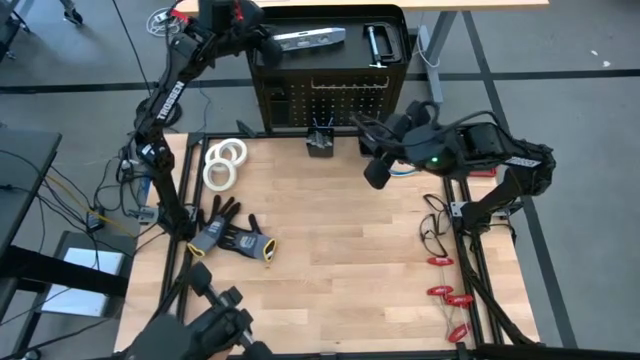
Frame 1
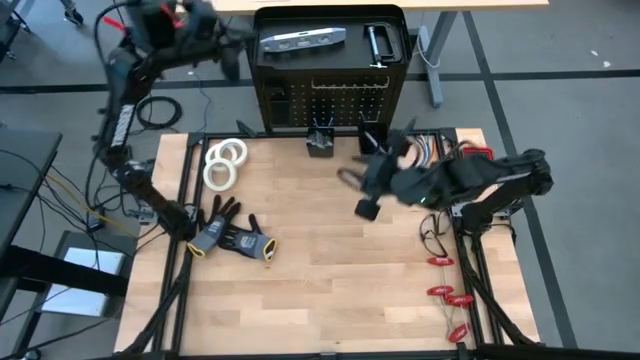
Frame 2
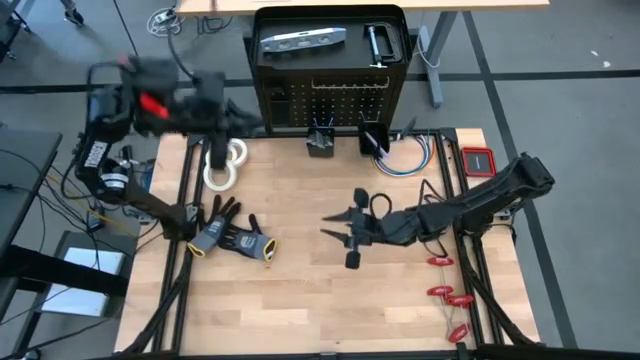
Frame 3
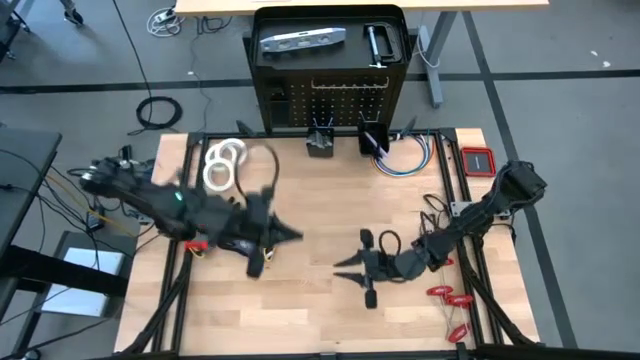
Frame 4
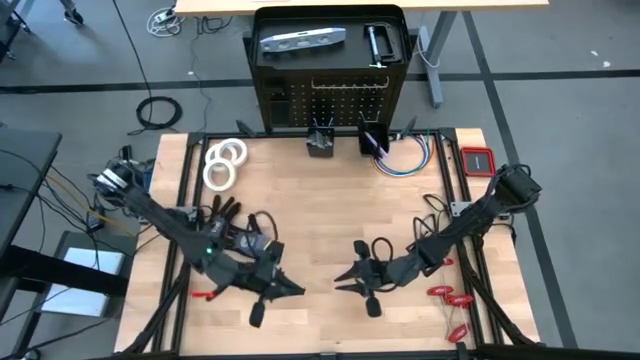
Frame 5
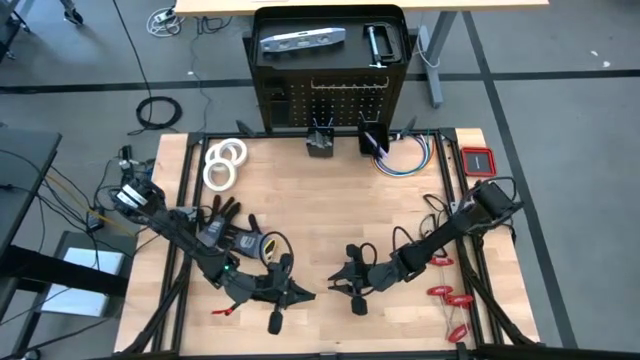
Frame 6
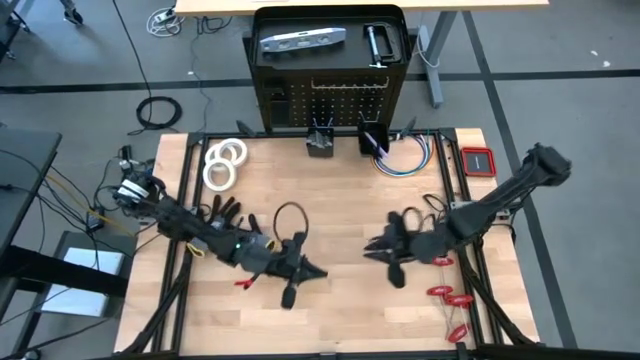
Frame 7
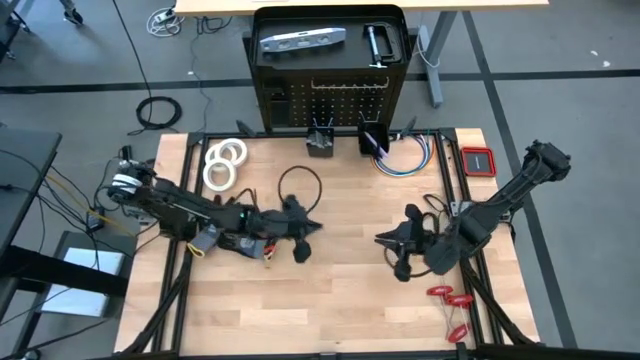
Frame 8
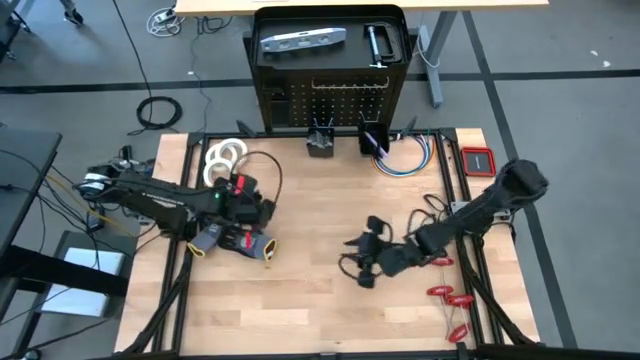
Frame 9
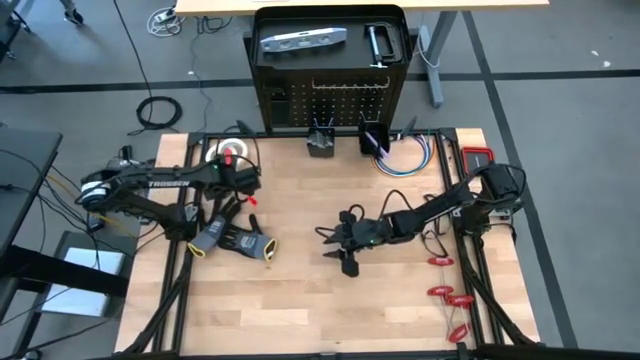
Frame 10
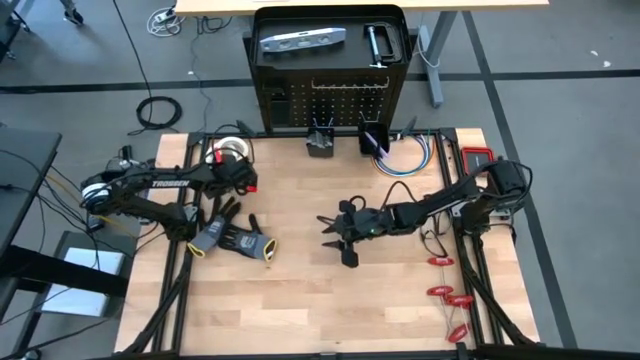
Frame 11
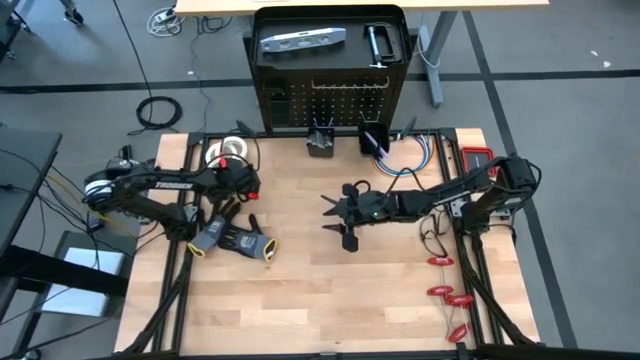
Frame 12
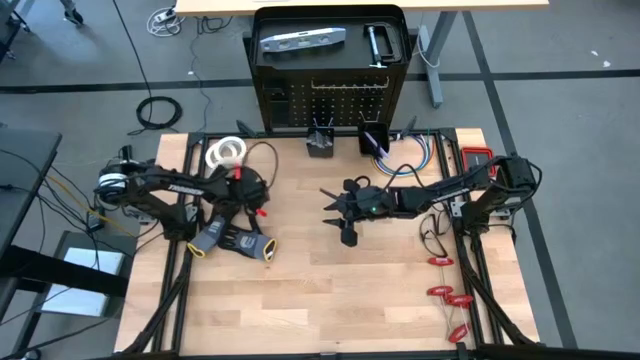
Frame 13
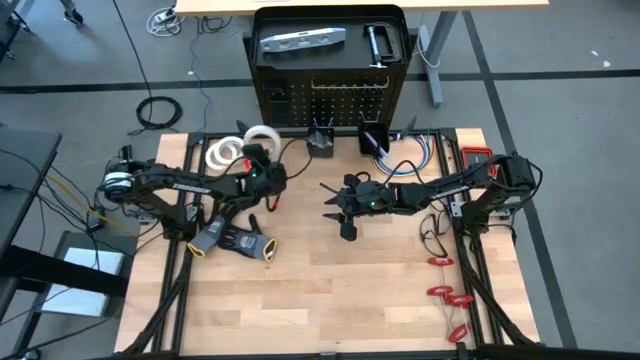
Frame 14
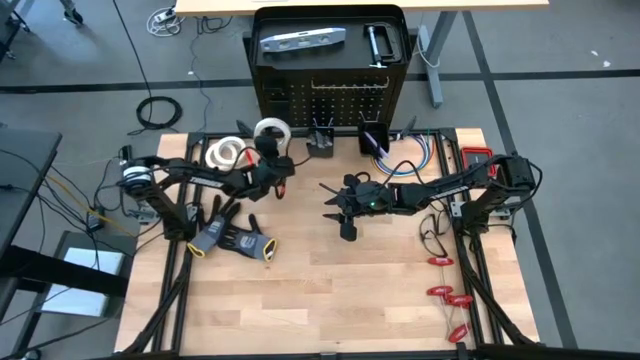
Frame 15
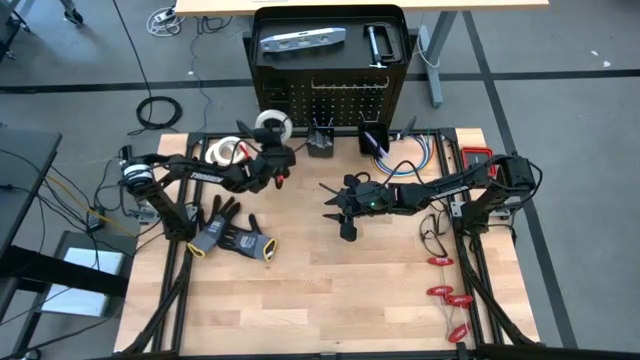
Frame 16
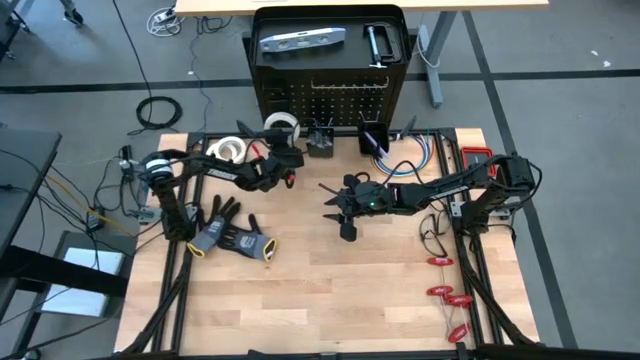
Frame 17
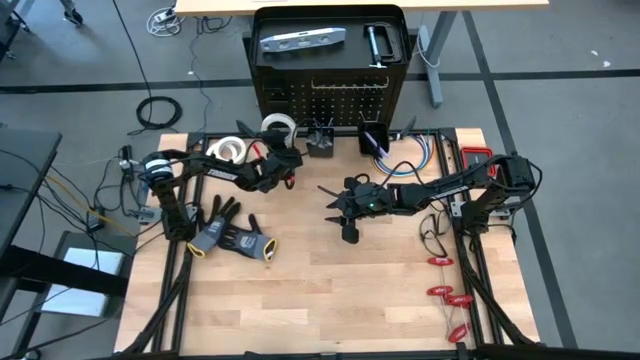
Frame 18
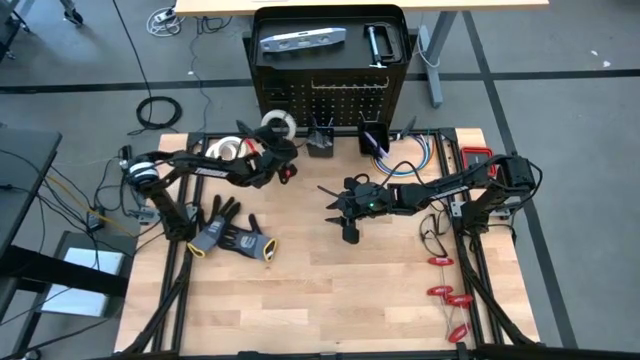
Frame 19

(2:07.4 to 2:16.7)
Task: Hang tools onto peg board
Hang the white tape on the peg board

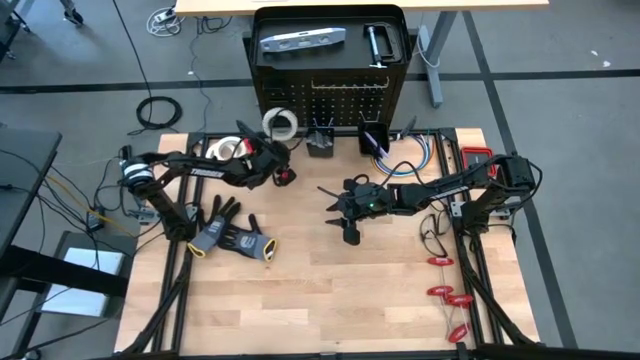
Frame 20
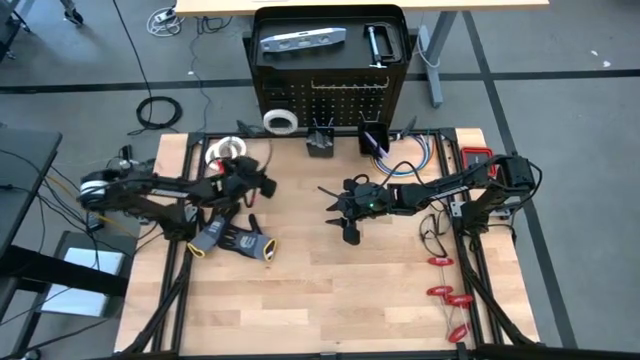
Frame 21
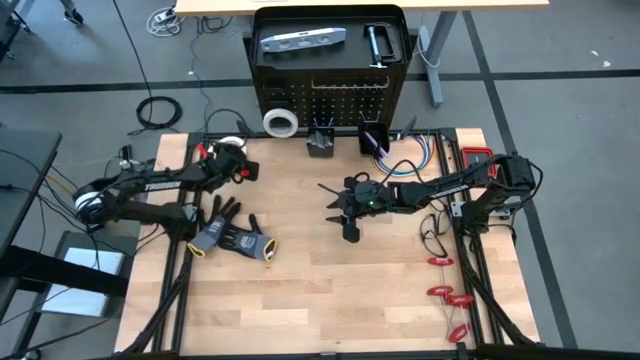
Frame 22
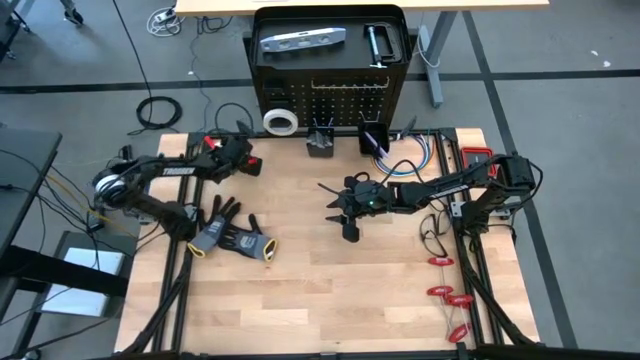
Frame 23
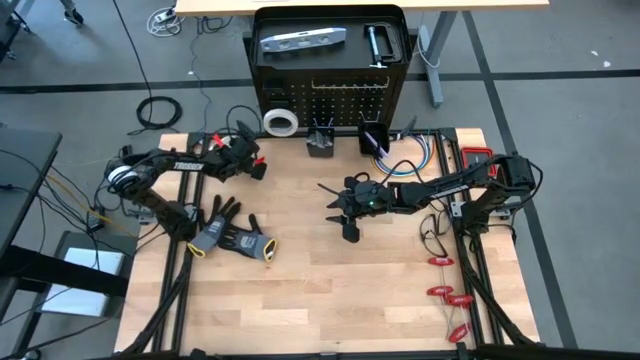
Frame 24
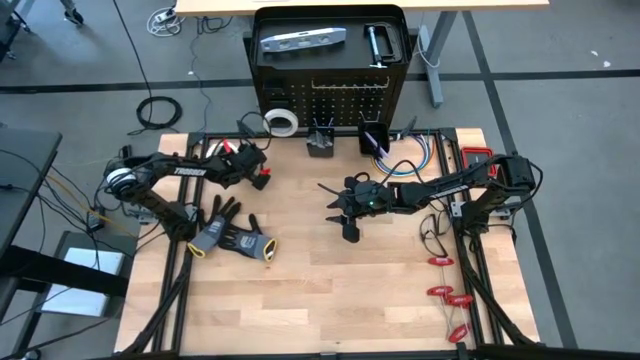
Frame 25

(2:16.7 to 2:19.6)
Hang the white tape on the peg board

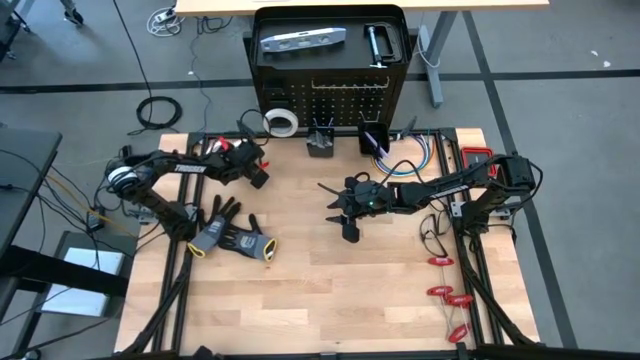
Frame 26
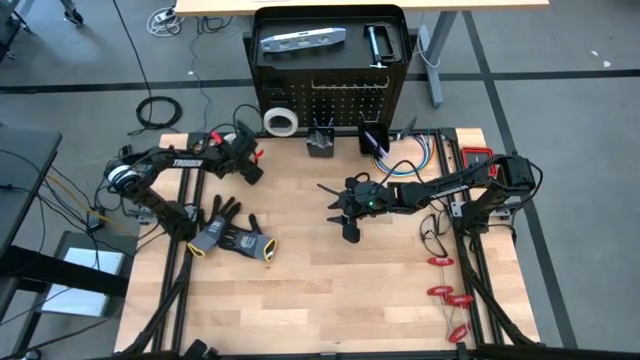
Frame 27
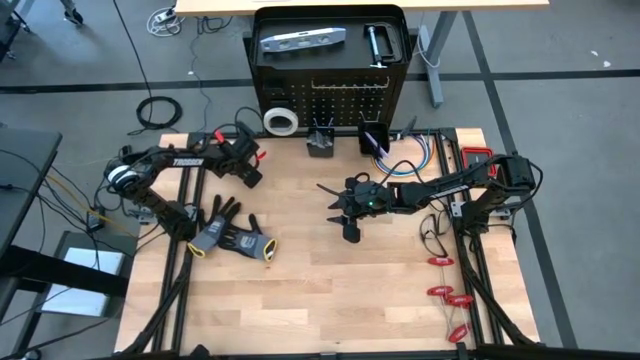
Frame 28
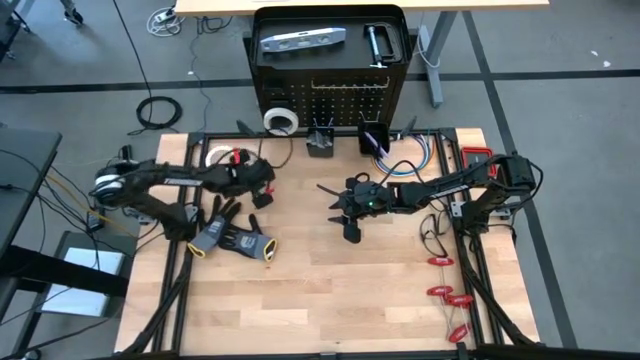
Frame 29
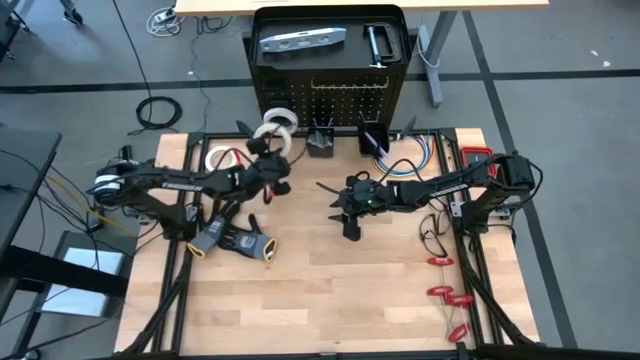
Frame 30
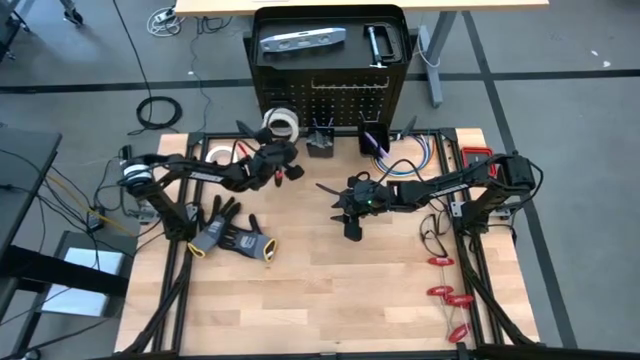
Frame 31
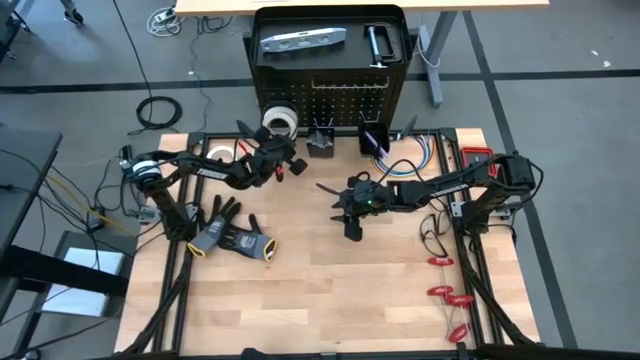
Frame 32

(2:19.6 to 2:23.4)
Hang the white tape on the peg board

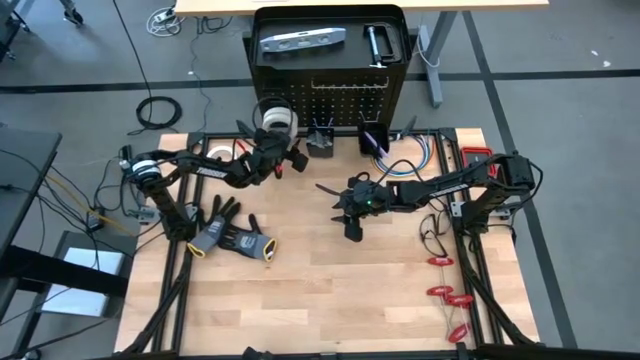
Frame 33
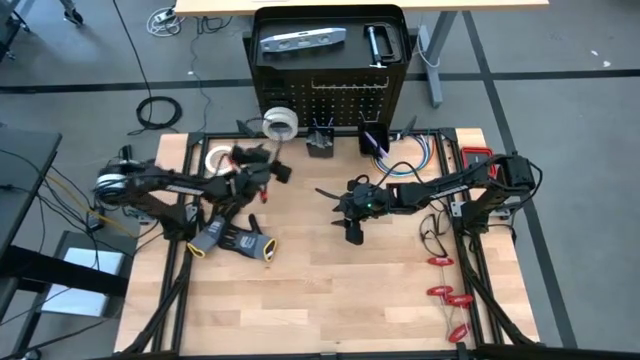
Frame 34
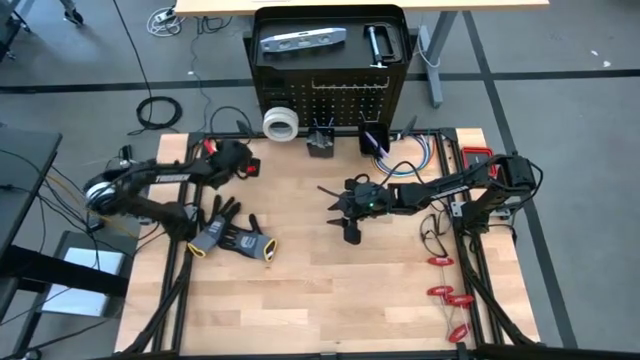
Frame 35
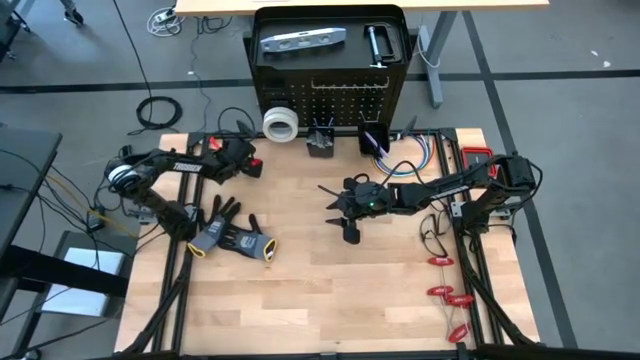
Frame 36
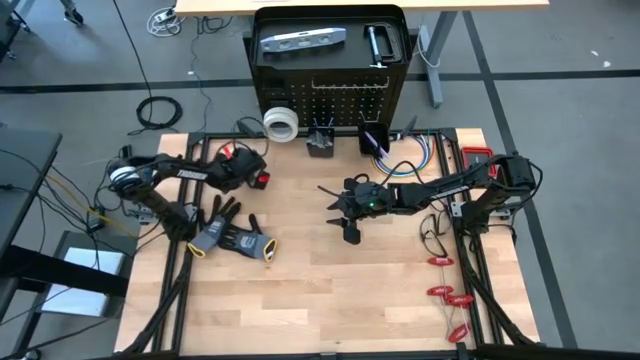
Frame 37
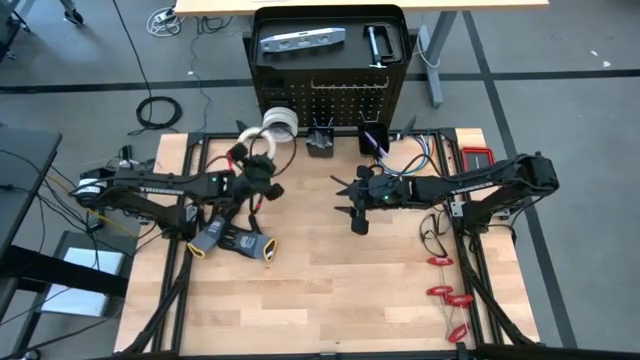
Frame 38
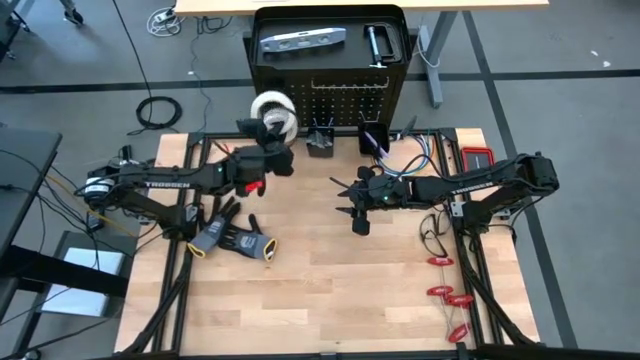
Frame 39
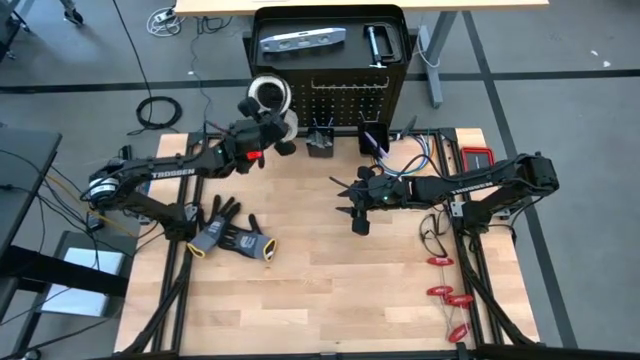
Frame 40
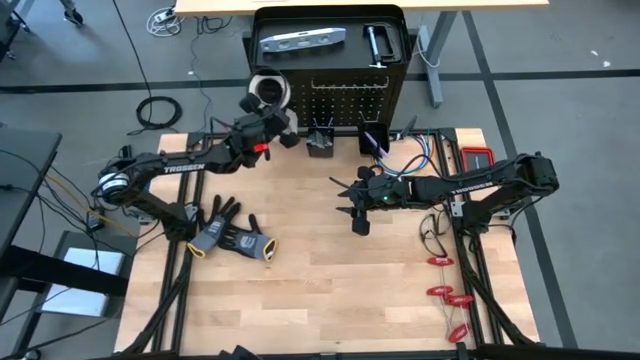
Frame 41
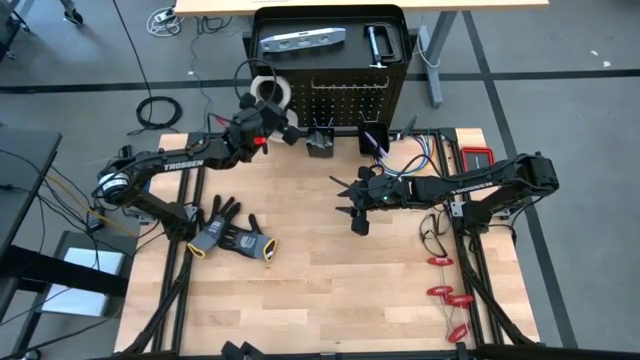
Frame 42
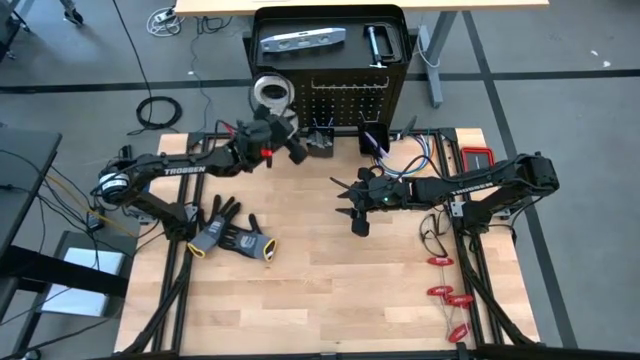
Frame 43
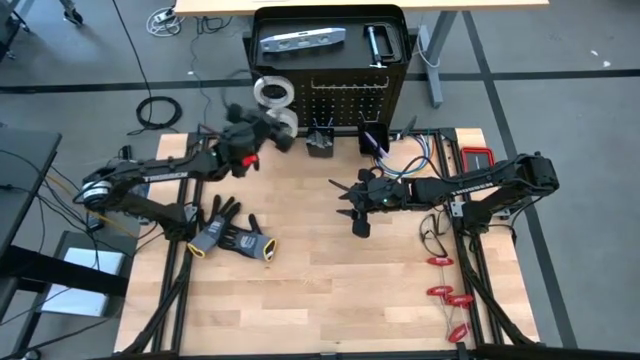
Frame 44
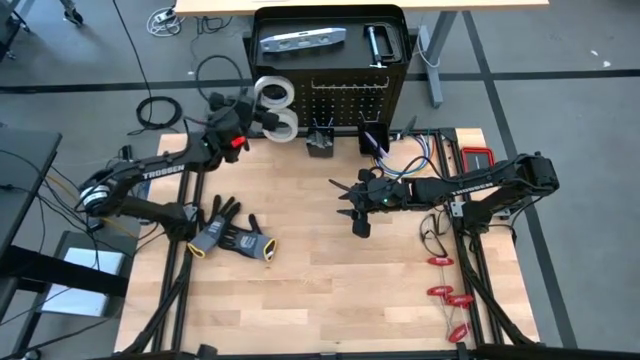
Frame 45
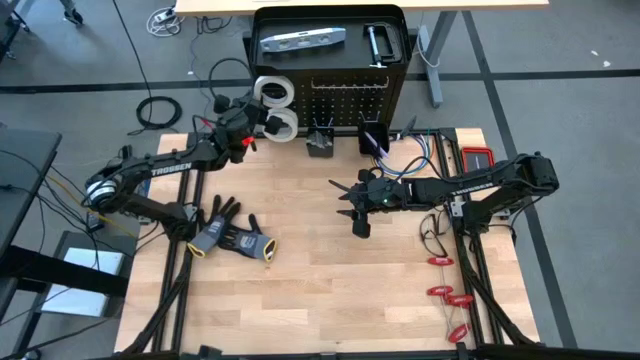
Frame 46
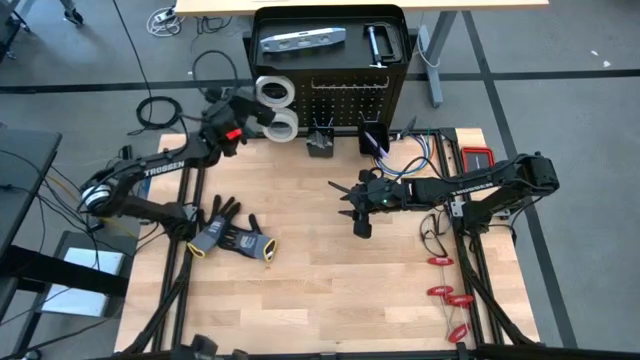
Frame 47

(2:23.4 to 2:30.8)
Hang the white tape on the peg board
